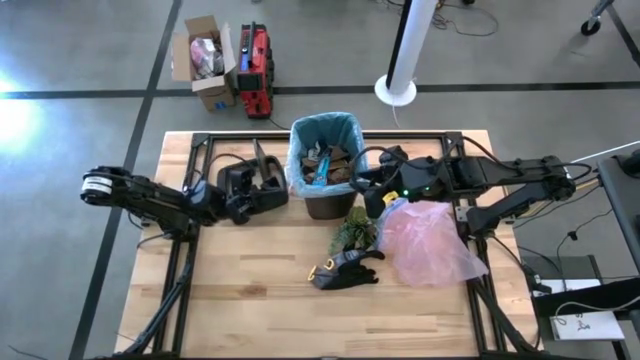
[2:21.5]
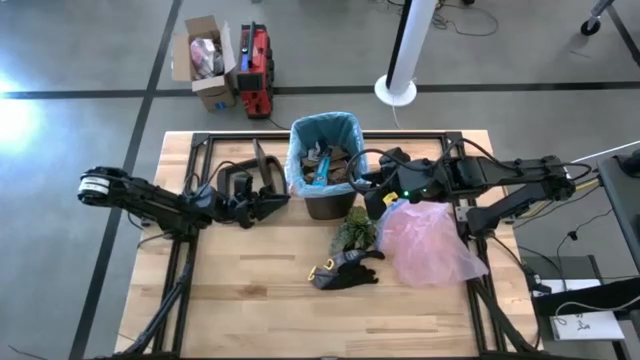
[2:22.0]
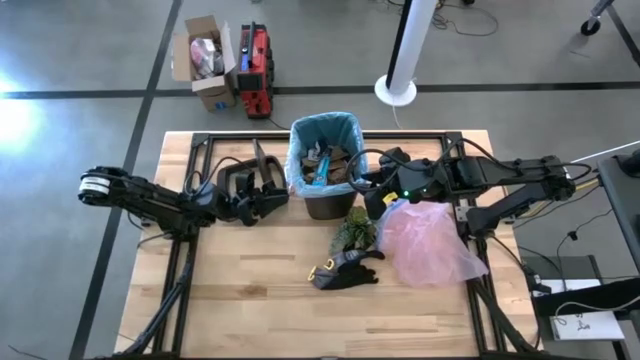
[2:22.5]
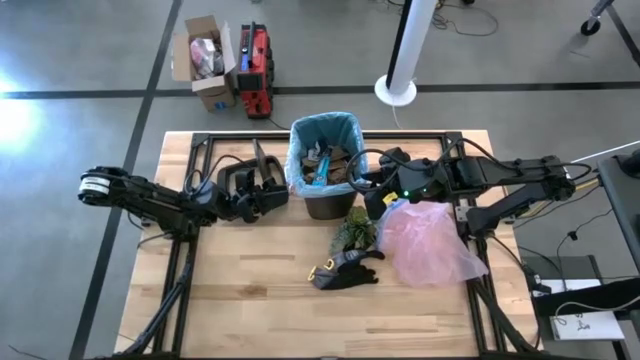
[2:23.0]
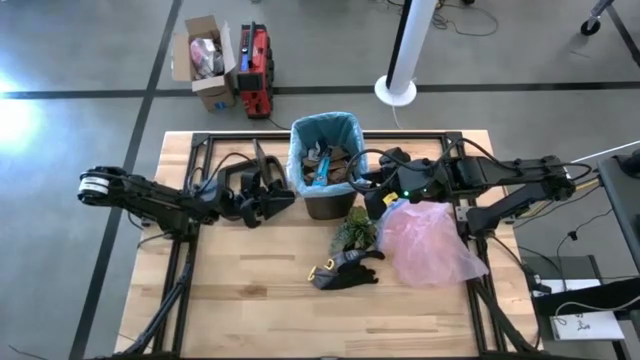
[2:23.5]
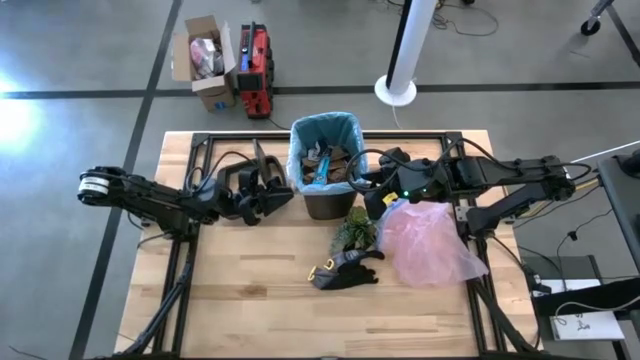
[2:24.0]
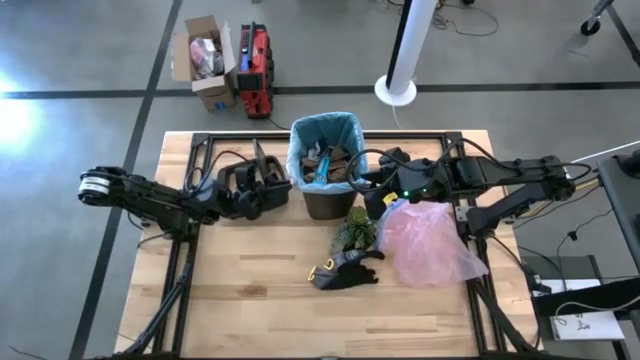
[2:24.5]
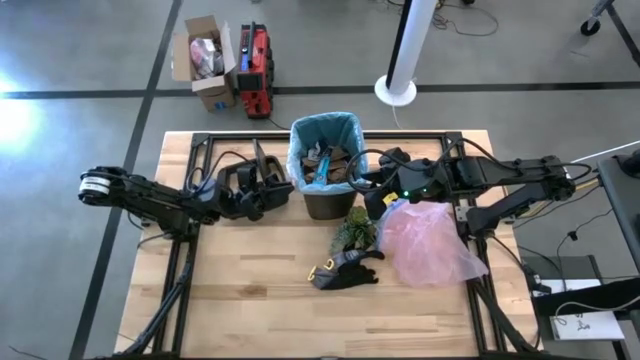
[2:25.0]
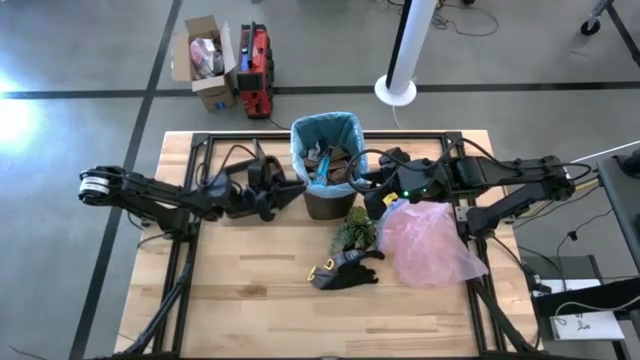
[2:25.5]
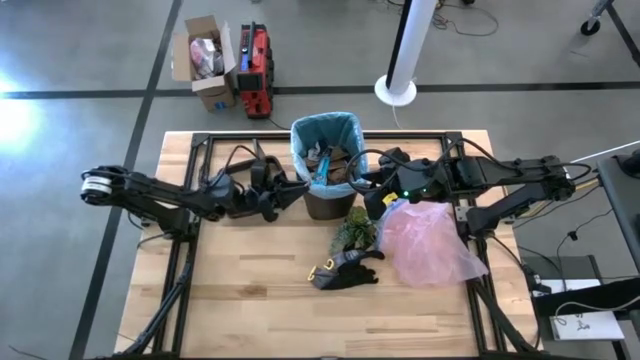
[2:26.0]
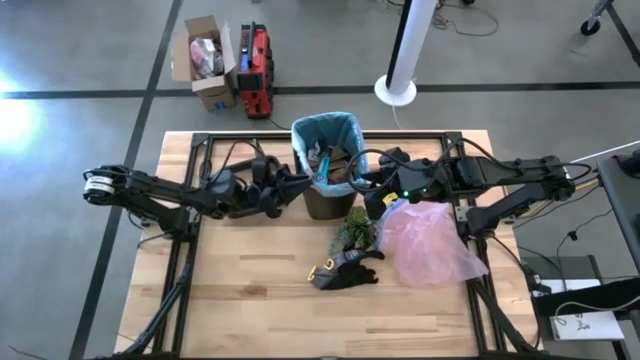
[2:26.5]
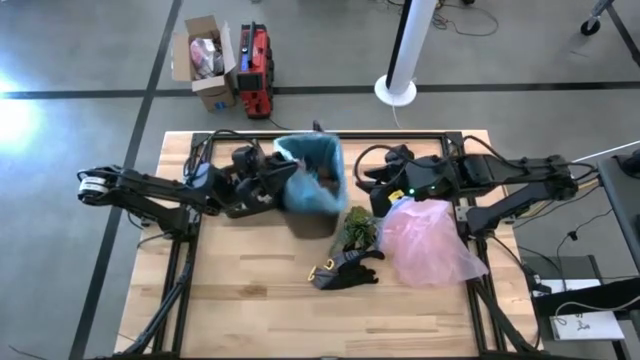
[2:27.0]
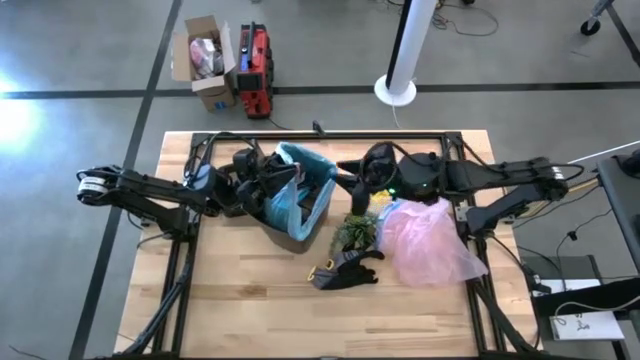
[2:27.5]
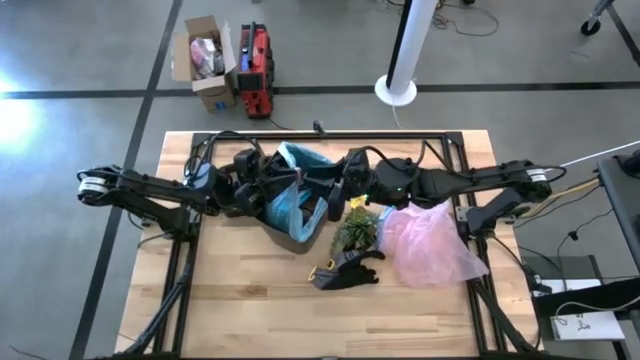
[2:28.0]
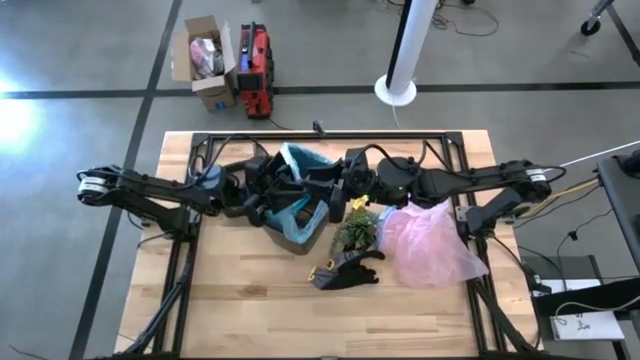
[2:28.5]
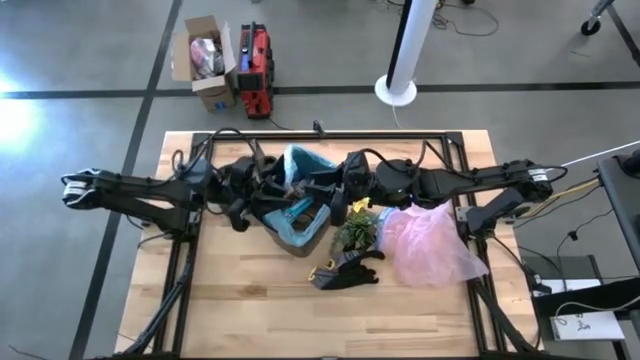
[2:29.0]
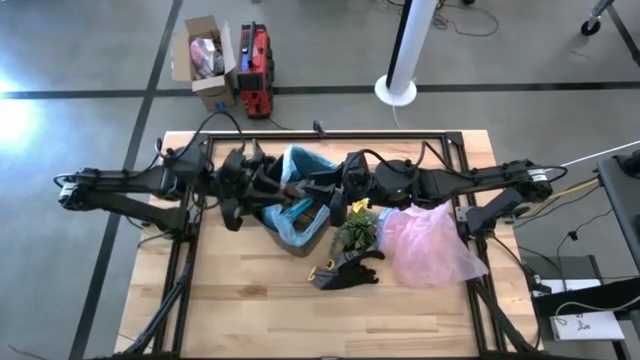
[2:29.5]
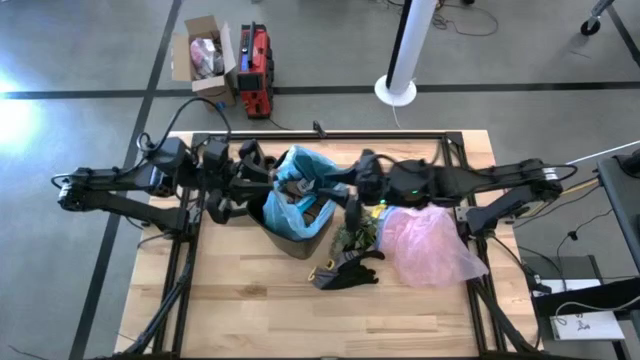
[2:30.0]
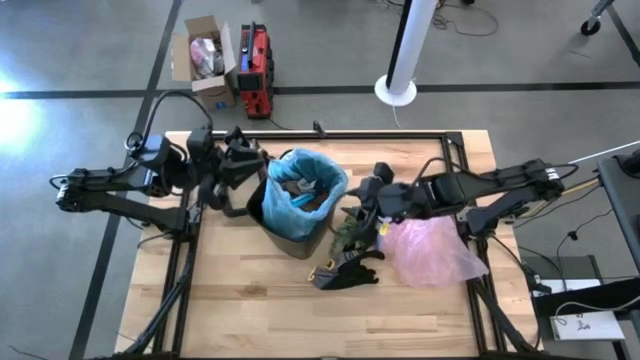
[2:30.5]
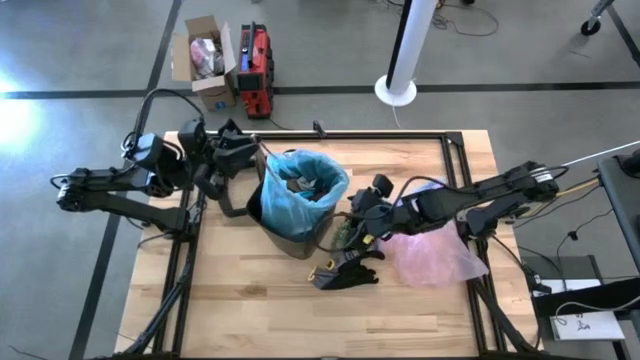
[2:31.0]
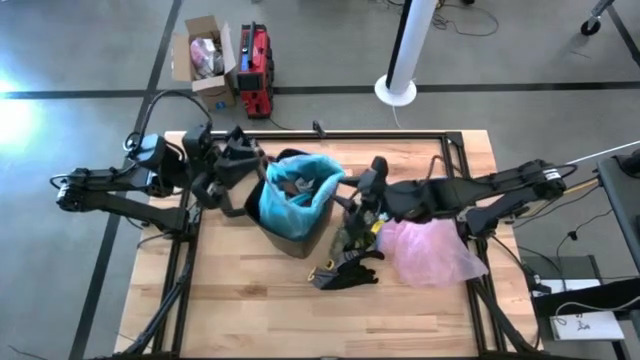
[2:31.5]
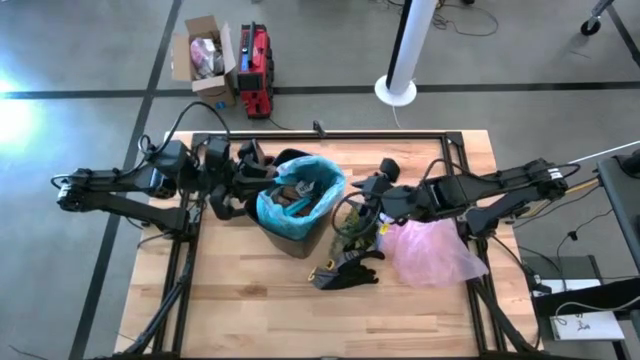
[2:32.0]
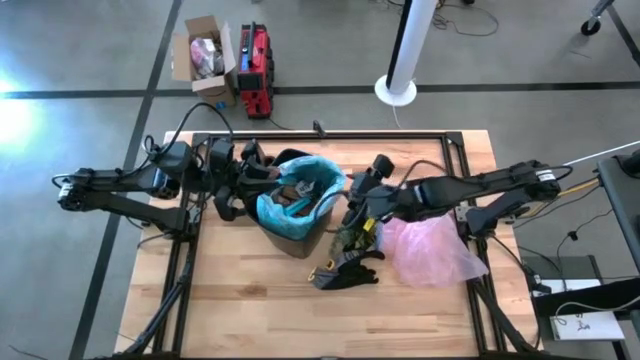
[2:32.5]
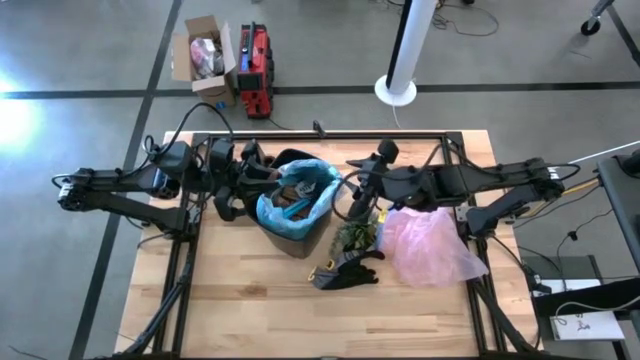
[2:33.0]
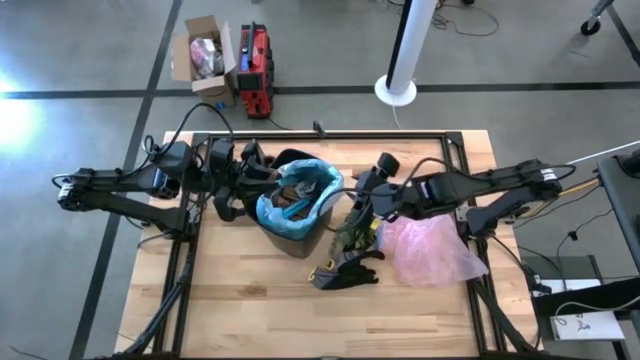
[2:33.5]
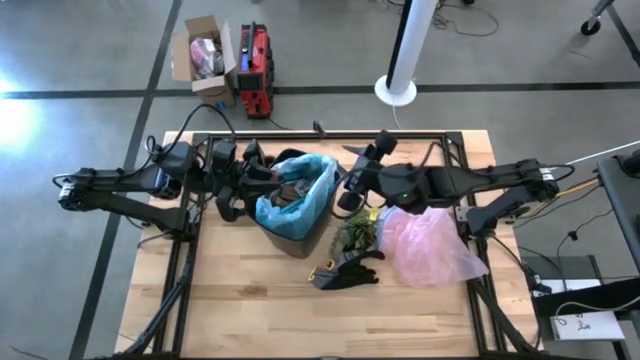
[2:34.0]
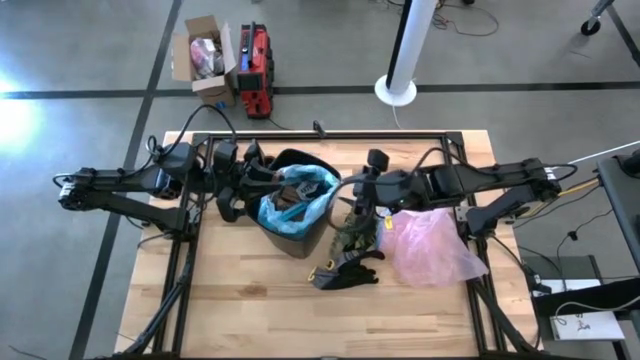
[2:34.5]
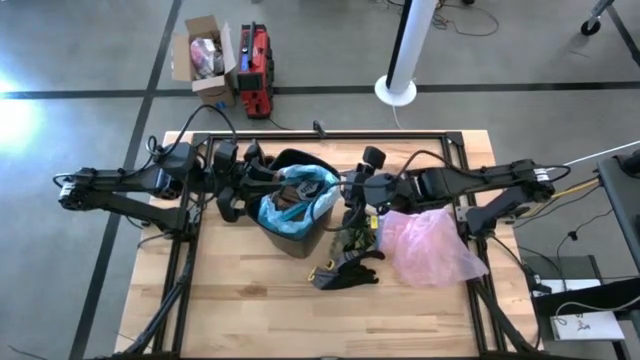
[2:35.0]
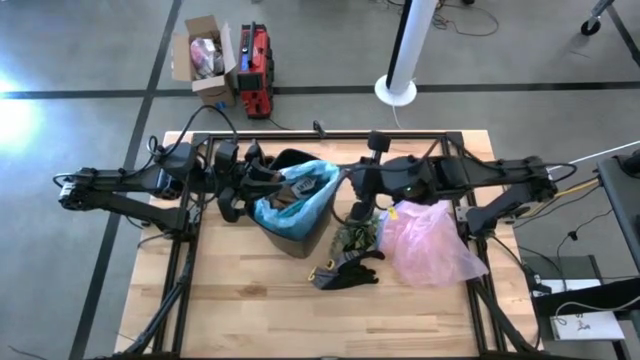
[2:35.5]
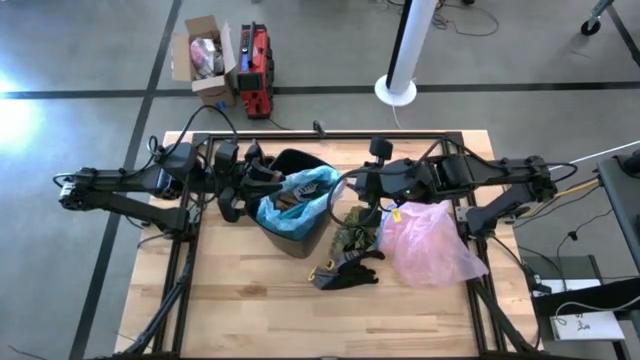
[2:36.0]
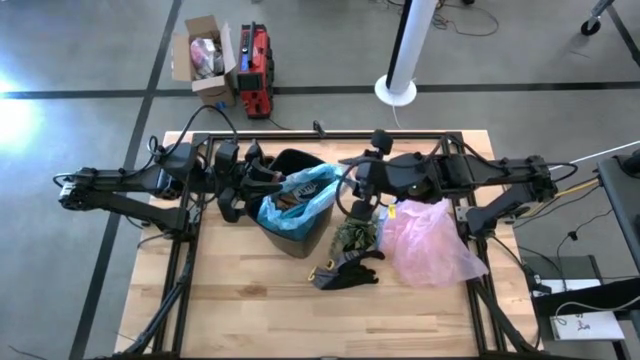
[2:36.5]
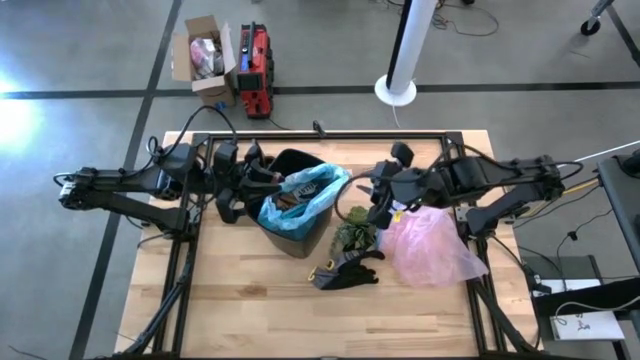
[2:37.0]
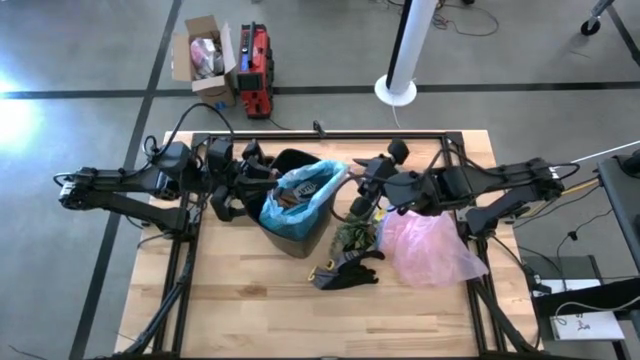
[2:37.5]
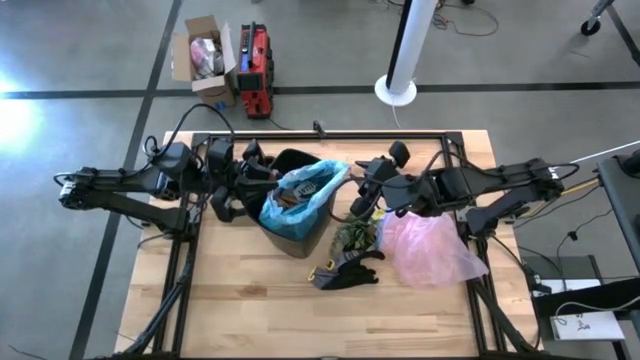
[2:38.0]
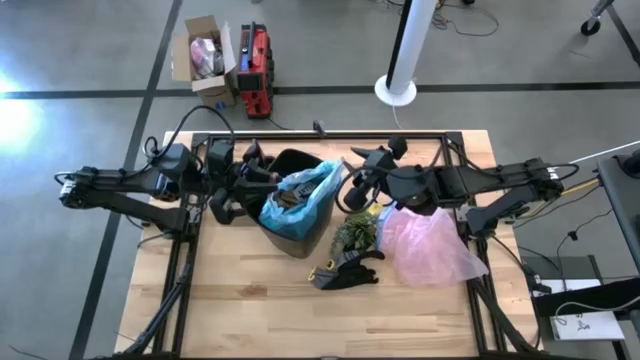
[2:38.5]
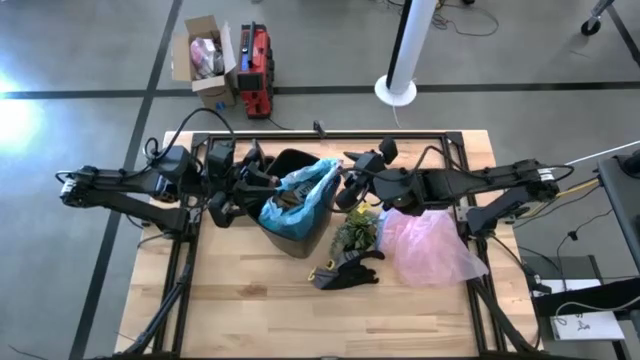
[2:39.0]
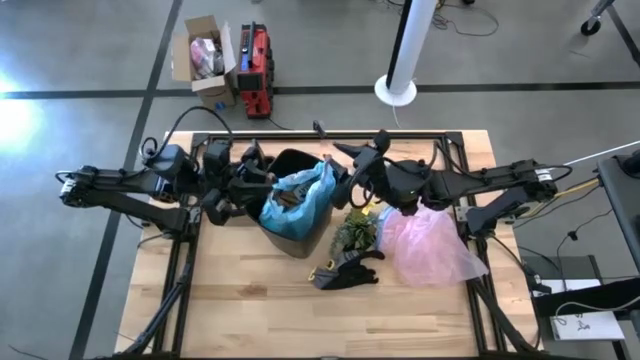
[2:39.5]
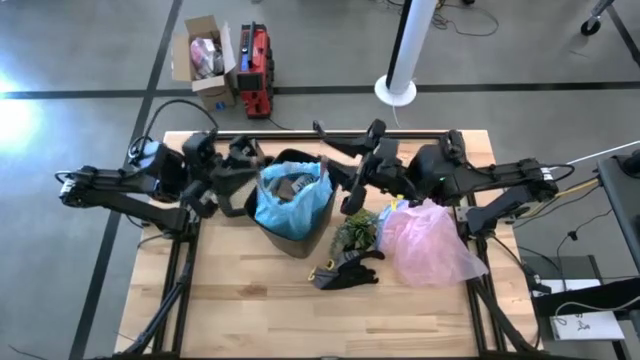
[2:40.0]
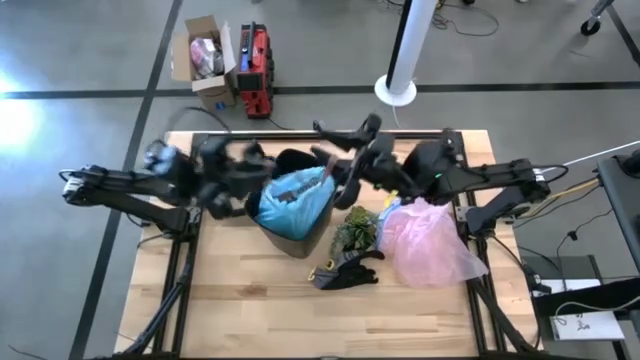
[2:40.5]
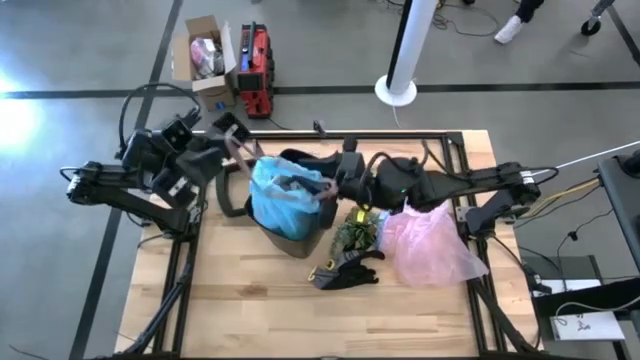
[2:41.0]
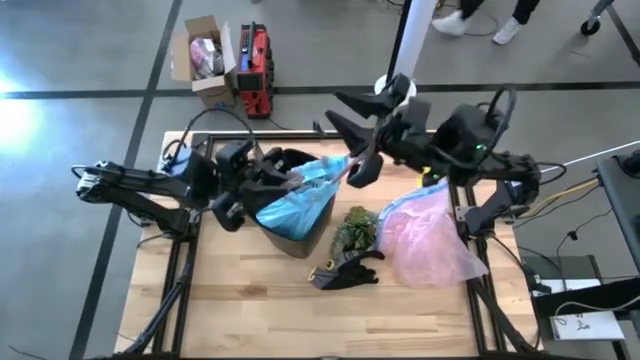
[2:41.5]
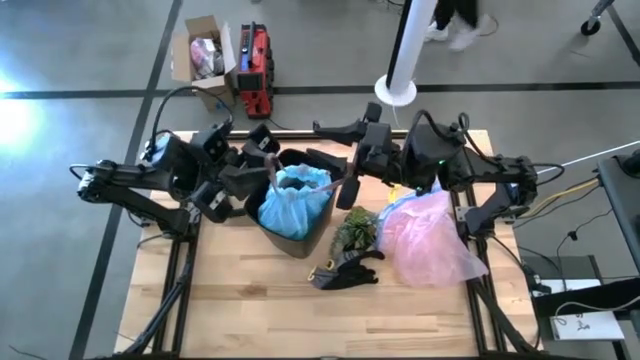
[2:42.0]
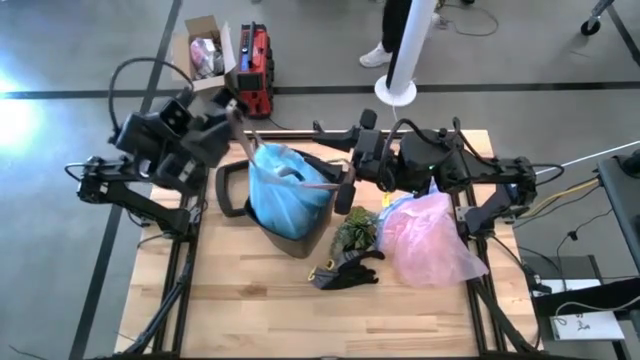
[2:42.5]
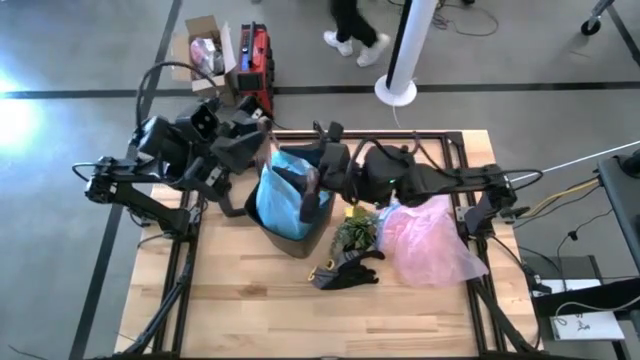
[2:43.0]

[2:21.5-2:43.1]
Task: place trash/remove bag and relplace
Remove trash bag from trash bin
